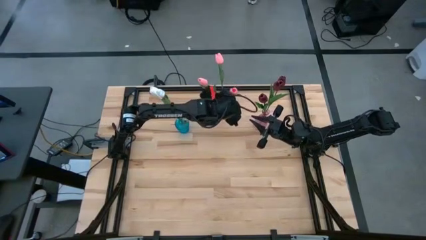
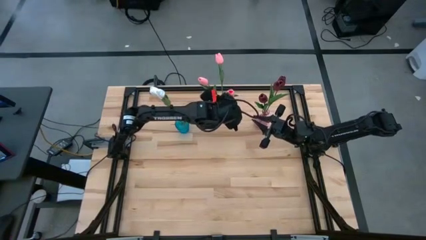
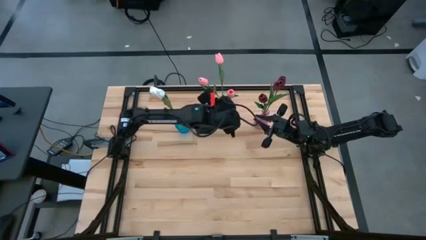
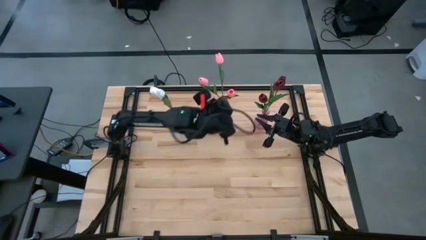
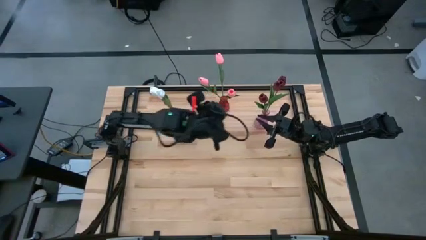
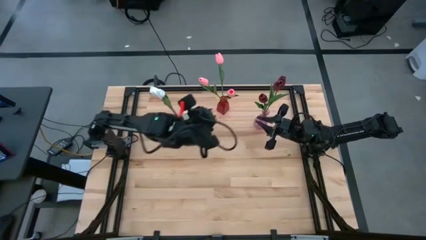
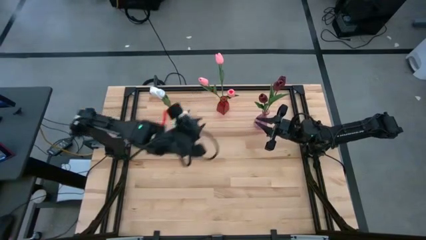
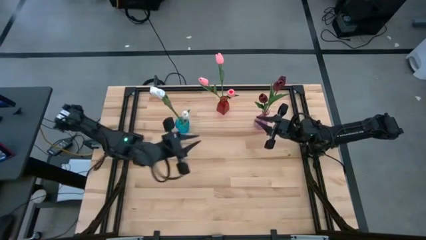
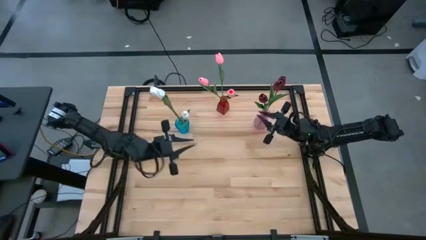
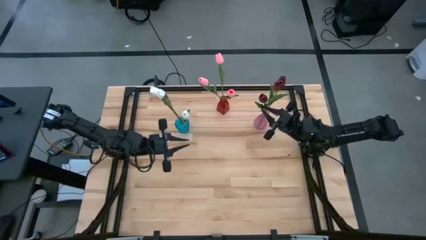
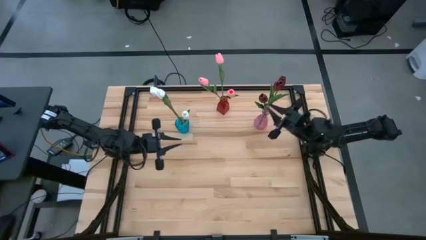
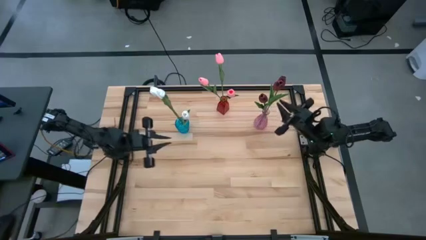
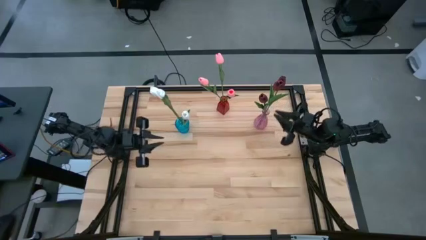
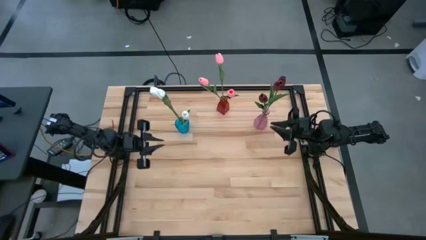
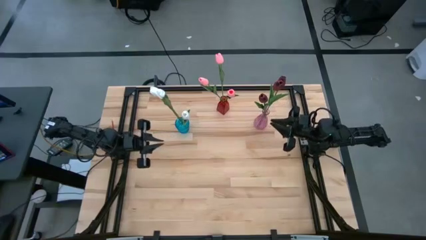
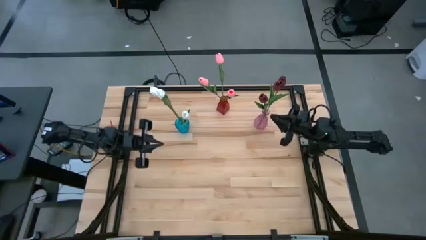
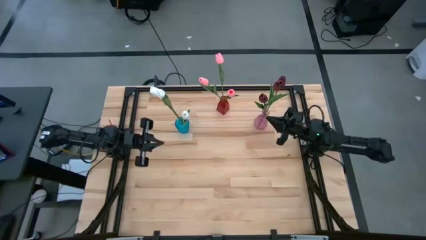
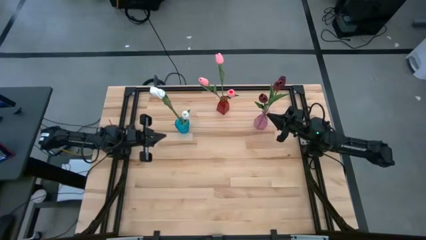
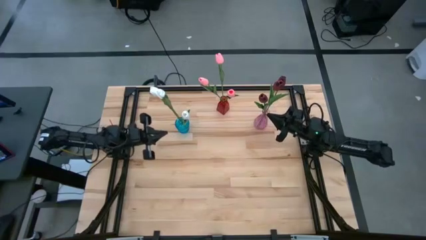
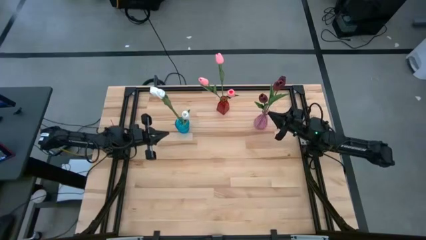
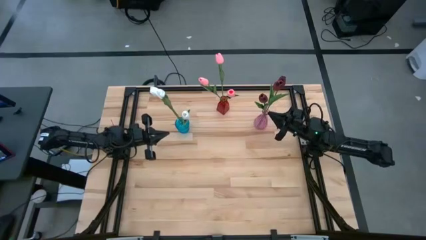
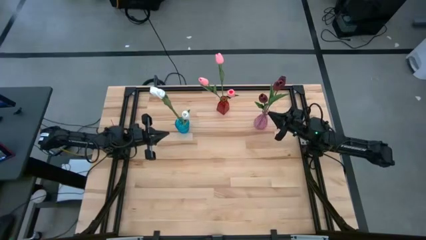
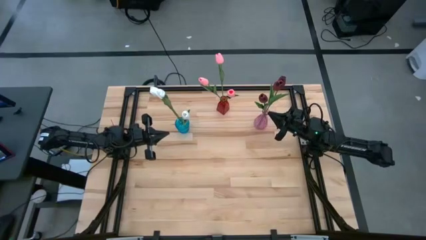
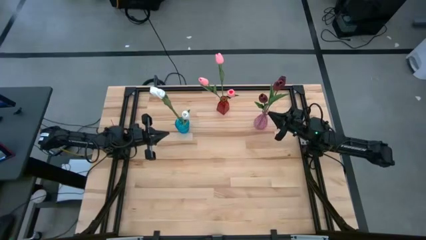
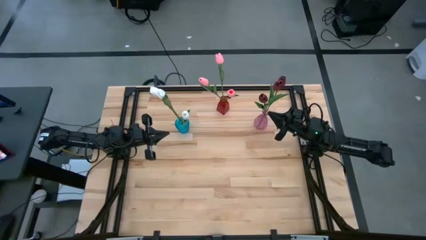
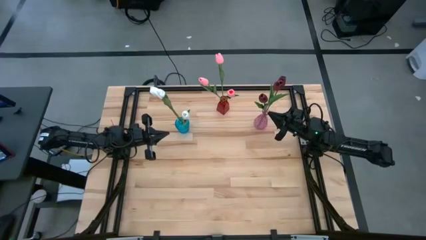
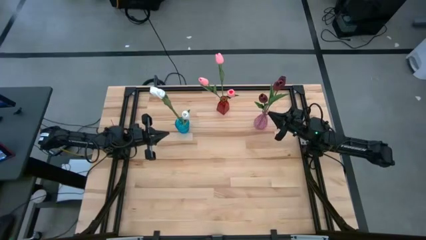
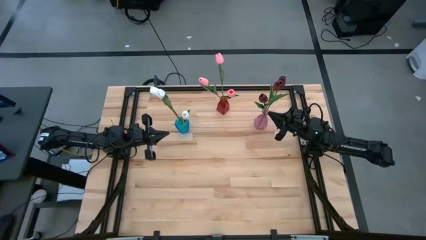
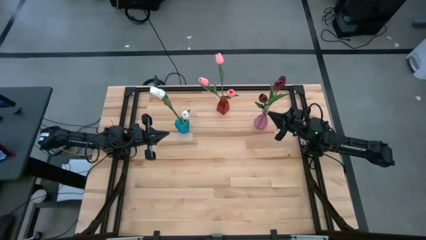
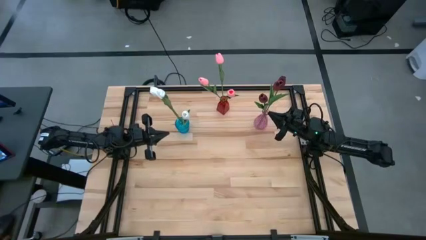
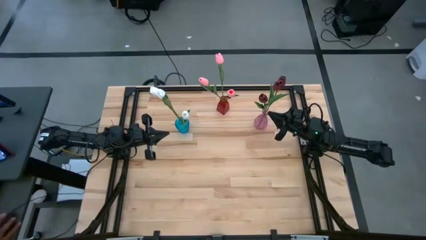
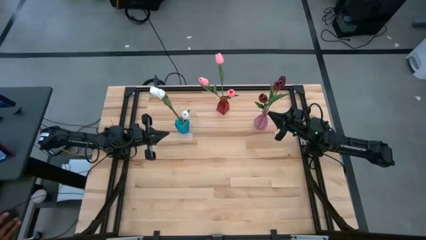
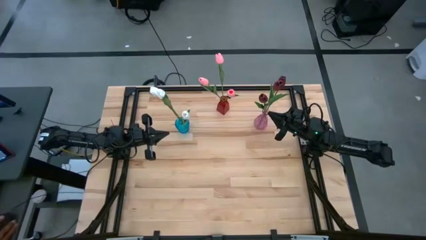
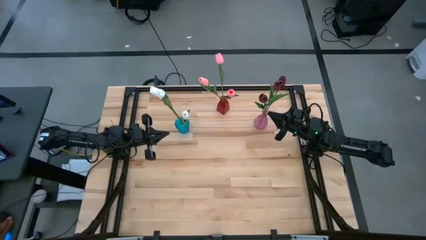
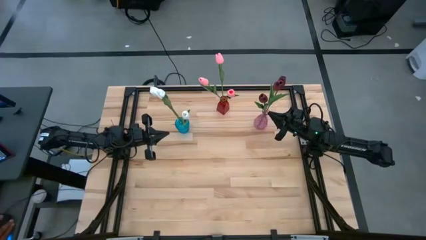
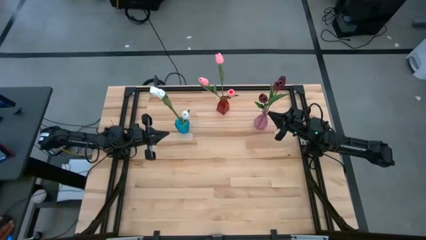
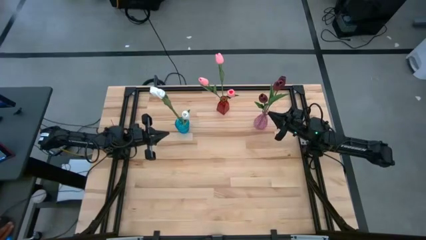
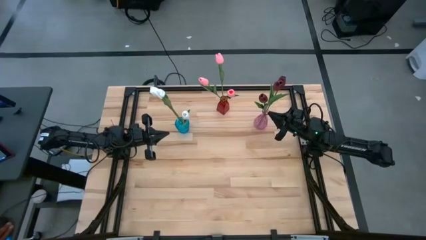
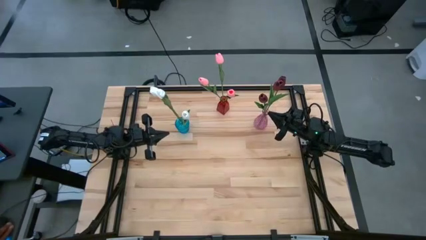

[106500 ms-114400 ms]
Task: Sort flowers into vase by color
Return to Home Position
